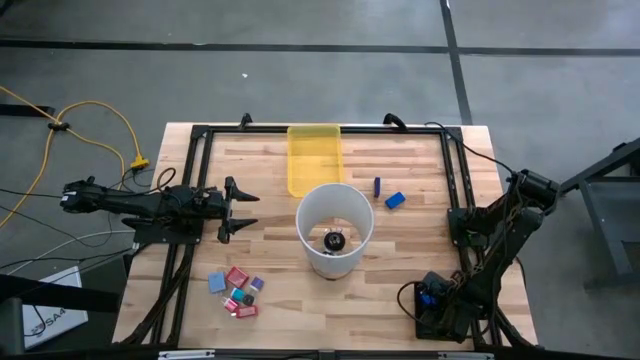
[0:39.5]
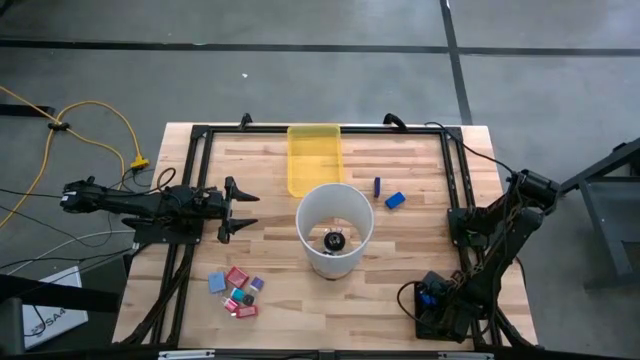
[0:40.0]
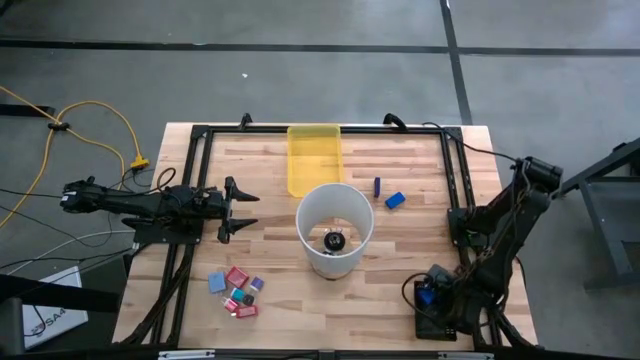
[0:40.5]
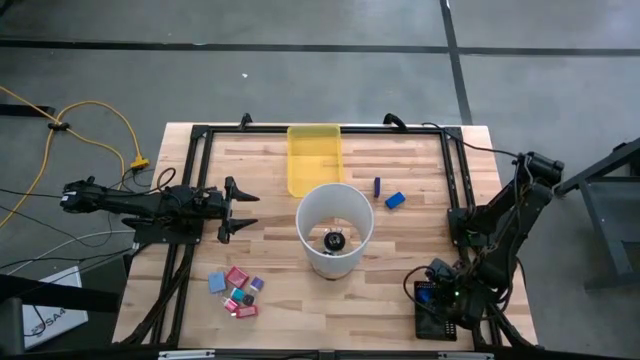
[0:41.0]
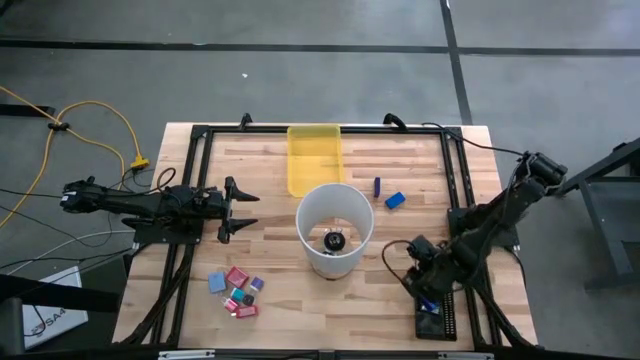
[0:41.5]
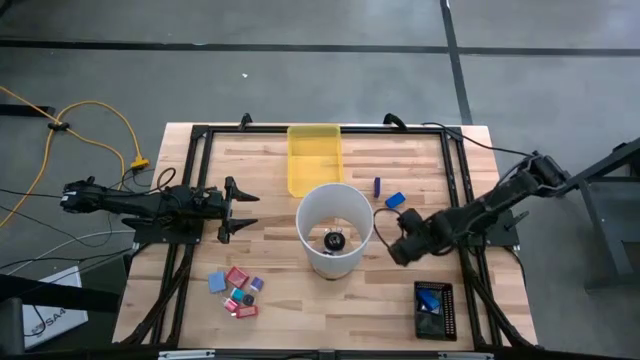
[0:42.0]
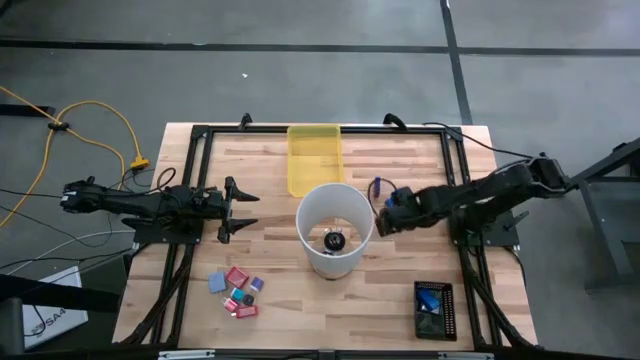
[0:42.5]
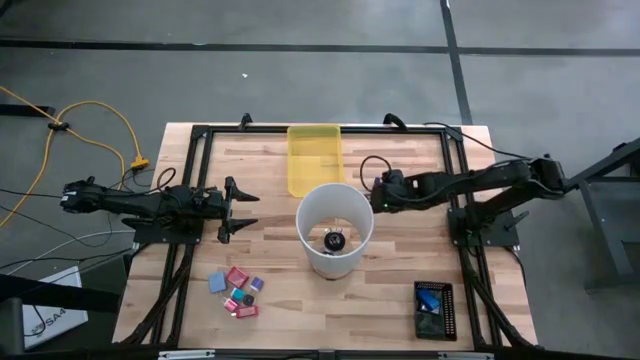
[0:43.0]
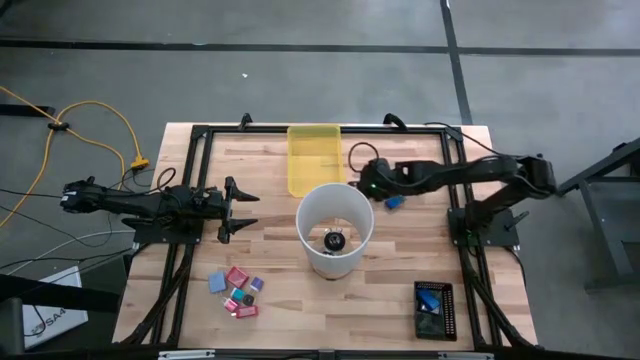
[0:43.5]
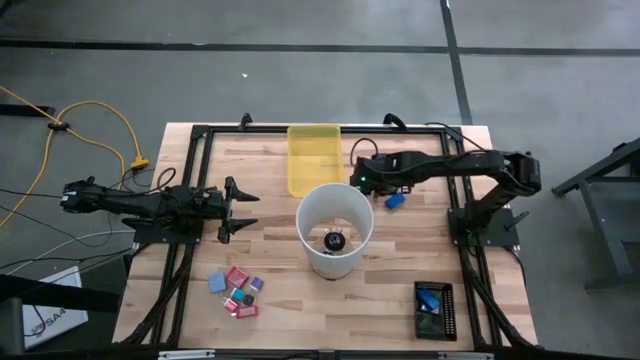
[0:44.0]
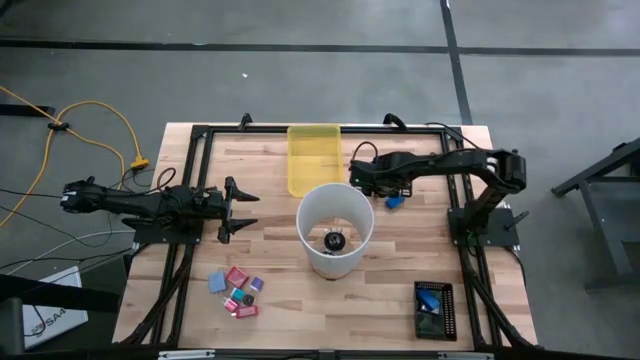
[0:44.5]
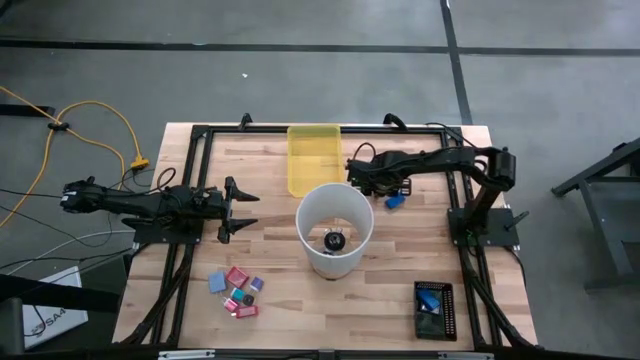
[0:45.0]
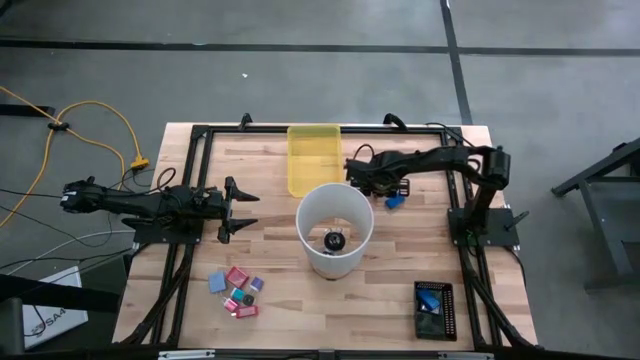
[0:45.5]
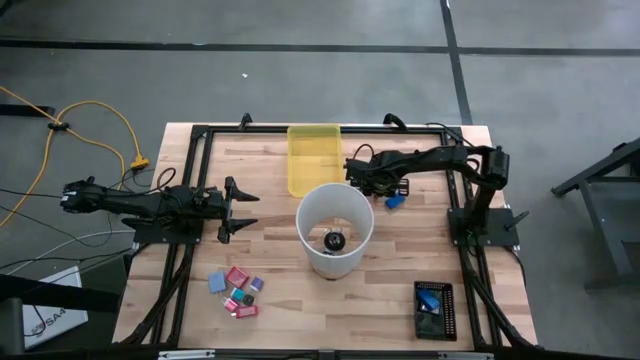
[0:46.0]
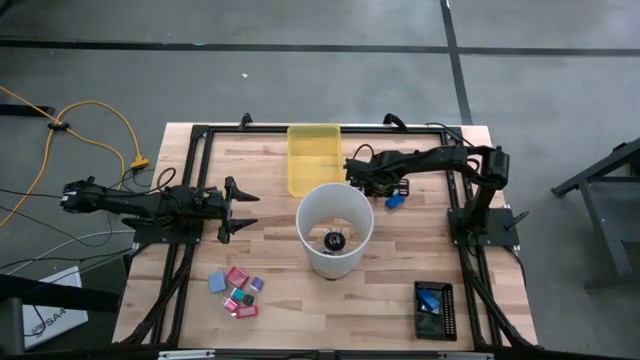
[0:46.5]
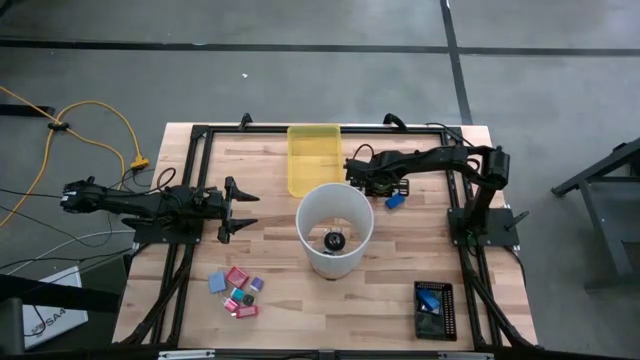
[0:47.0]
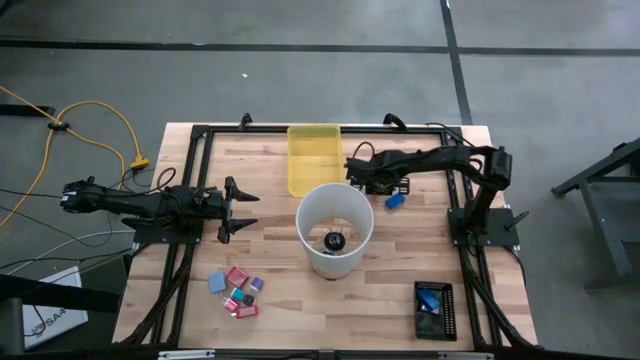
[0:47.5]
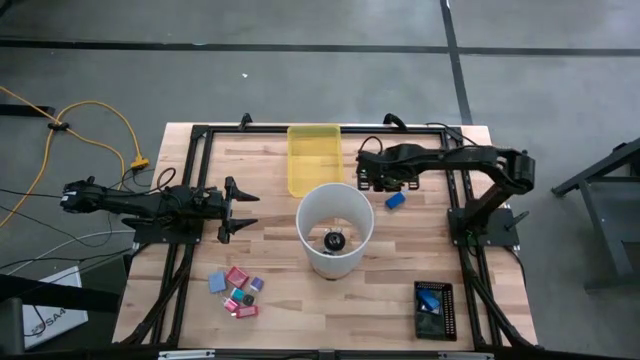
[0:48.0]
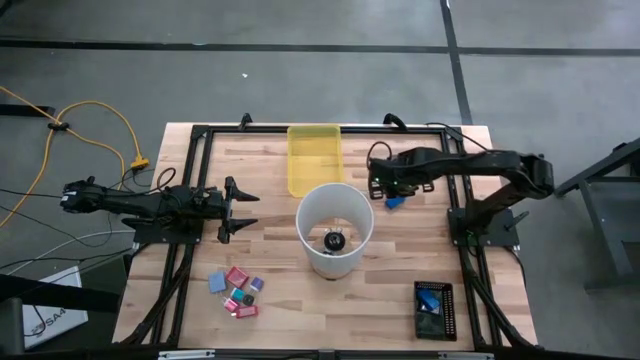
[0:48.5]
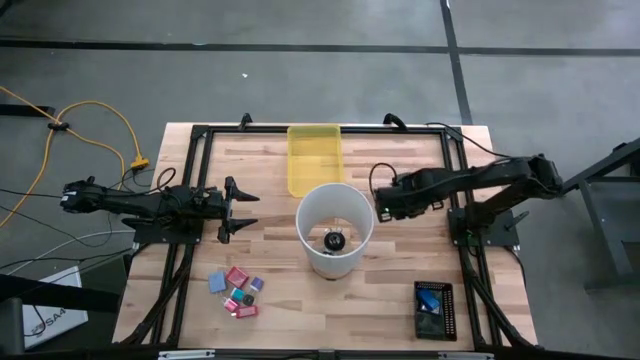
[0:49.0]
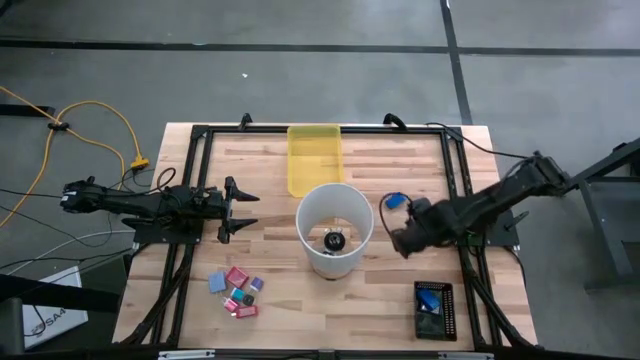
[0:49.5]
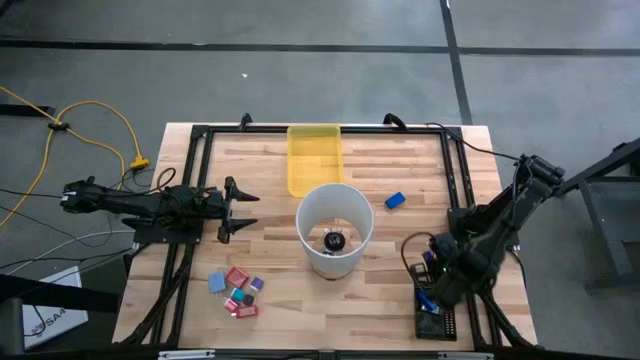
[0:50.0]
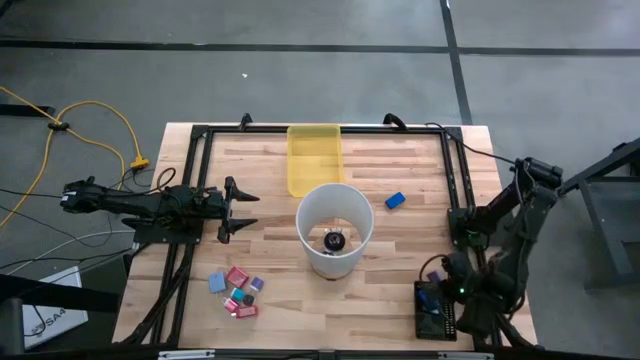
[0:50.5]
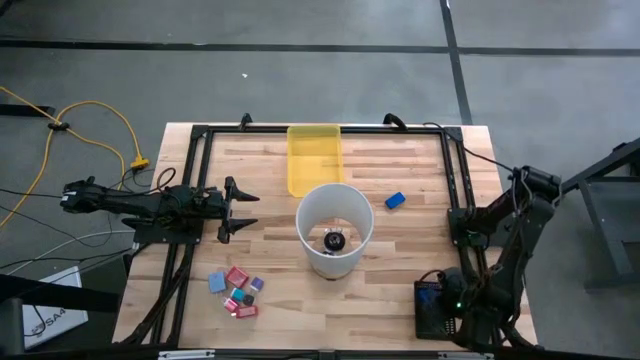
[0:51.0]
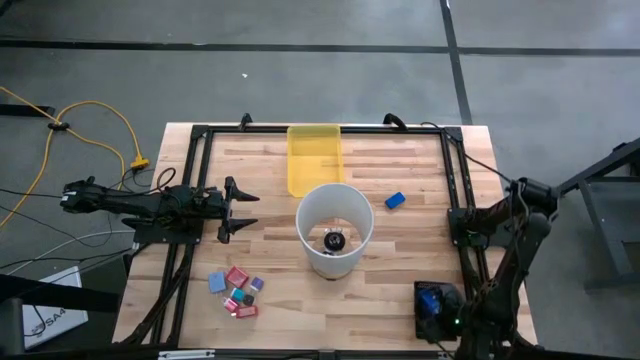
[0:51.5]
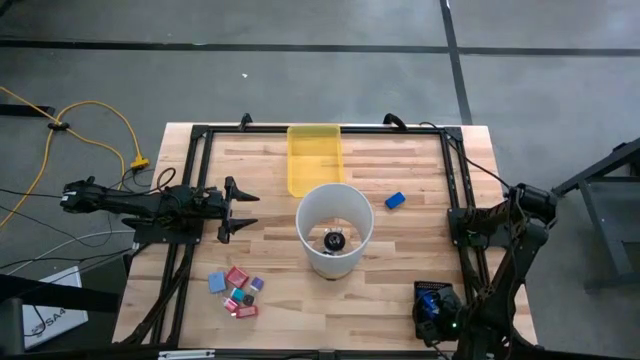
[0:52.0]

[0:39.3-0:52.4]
Task: Pick & Place Office items
Put the dark blue timer into the black bin
